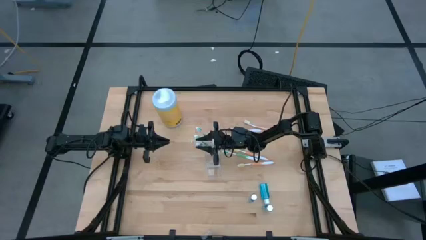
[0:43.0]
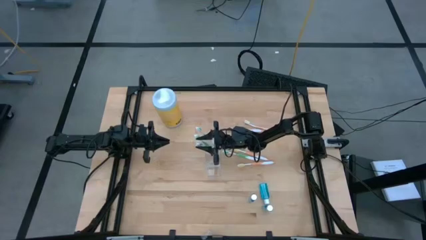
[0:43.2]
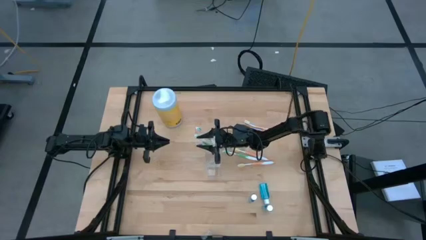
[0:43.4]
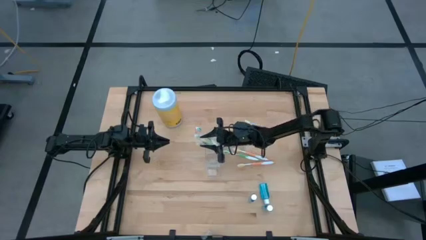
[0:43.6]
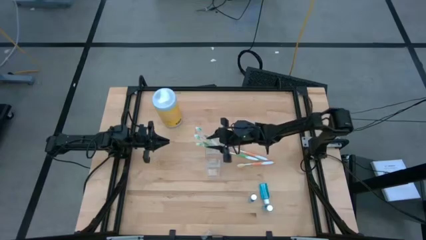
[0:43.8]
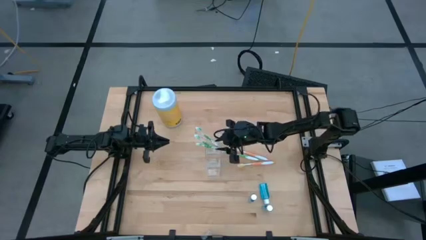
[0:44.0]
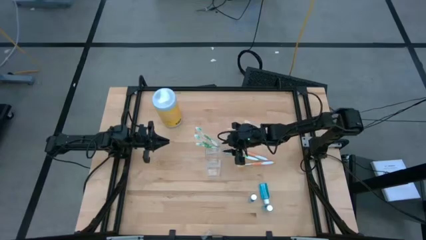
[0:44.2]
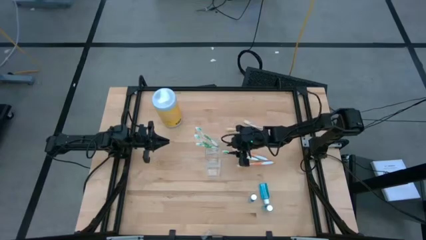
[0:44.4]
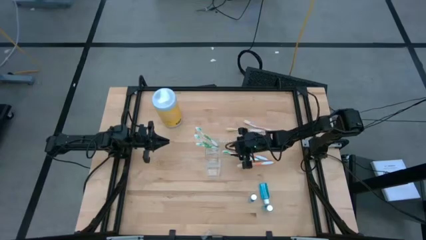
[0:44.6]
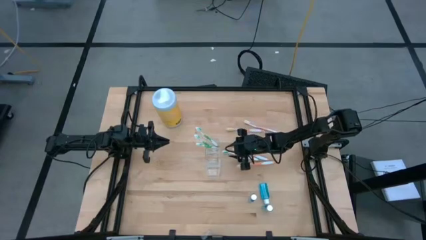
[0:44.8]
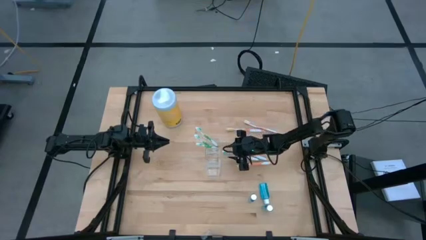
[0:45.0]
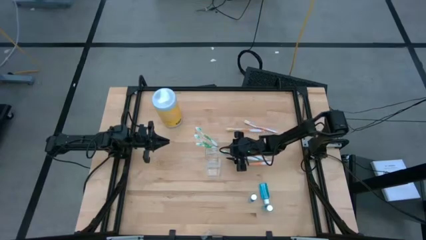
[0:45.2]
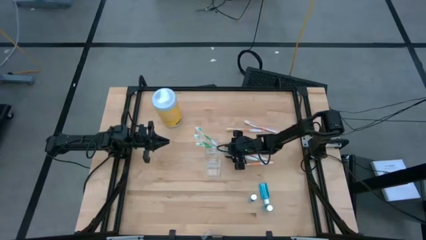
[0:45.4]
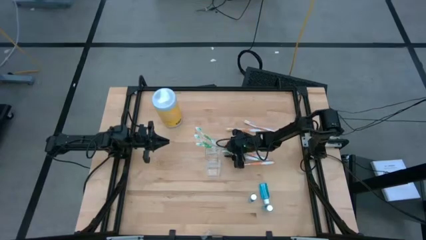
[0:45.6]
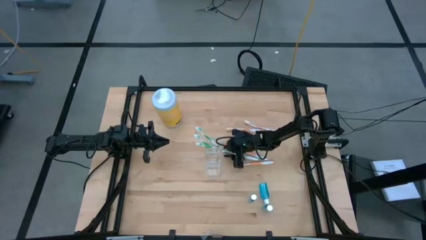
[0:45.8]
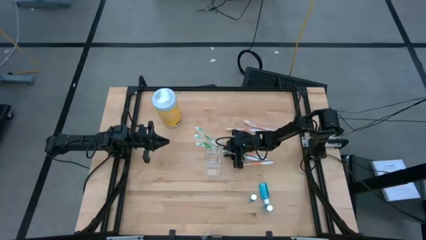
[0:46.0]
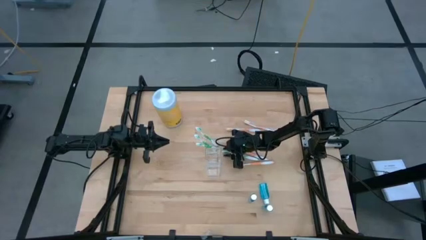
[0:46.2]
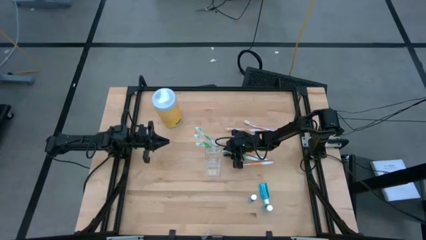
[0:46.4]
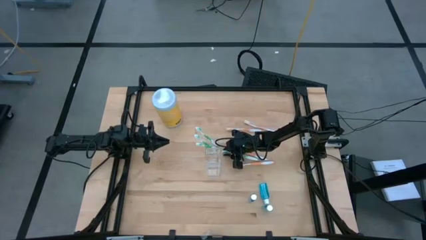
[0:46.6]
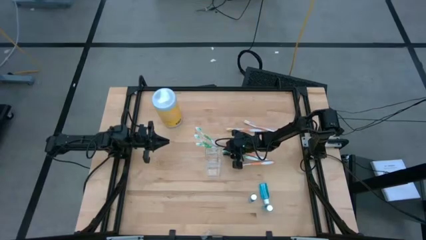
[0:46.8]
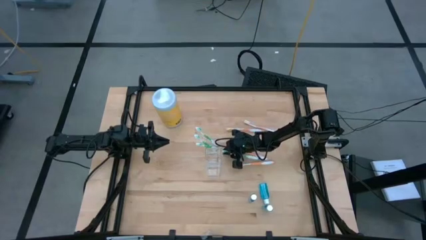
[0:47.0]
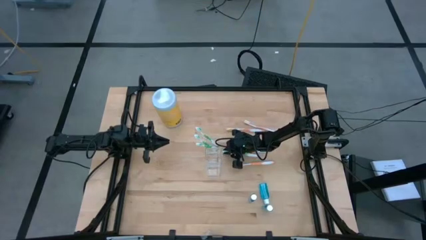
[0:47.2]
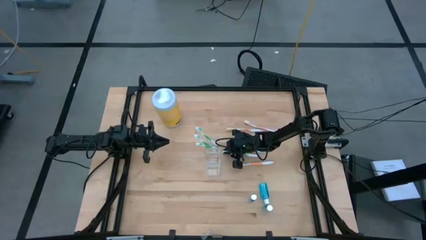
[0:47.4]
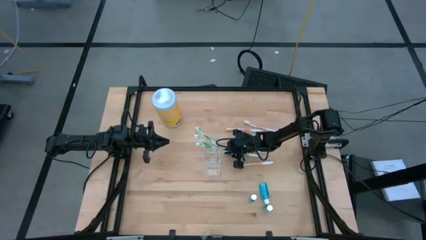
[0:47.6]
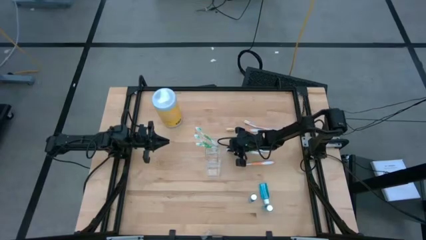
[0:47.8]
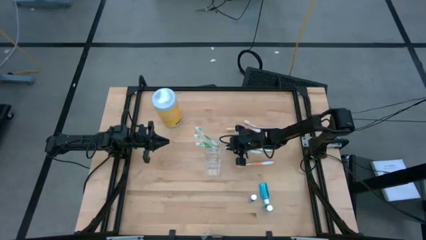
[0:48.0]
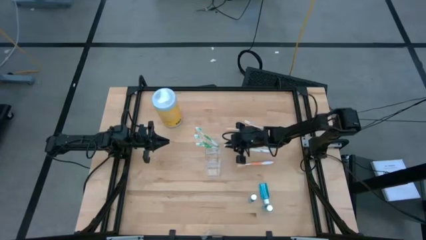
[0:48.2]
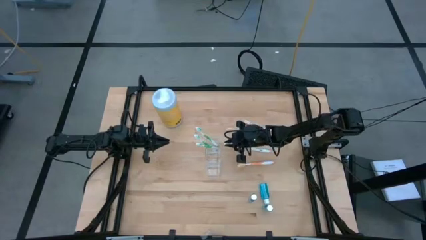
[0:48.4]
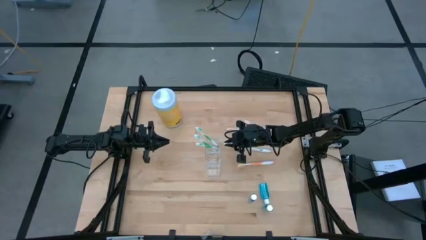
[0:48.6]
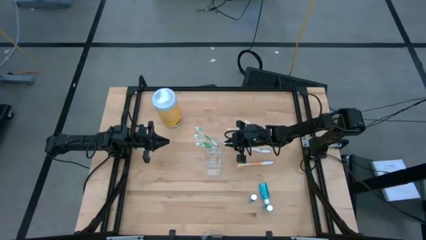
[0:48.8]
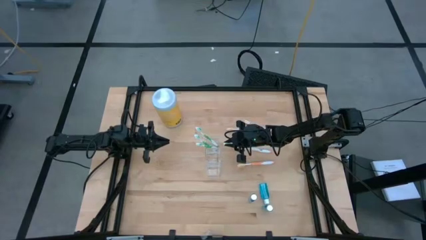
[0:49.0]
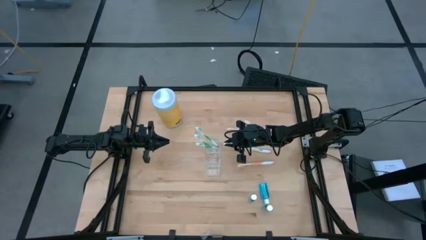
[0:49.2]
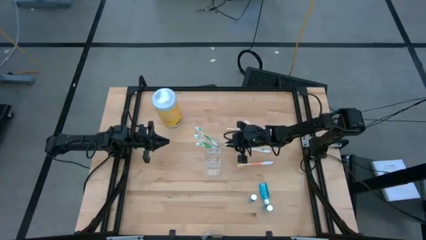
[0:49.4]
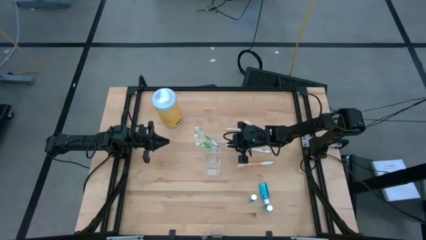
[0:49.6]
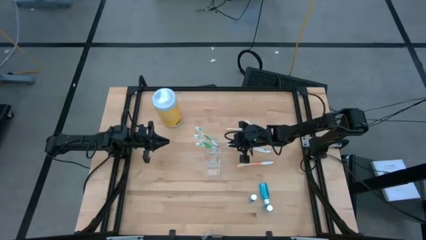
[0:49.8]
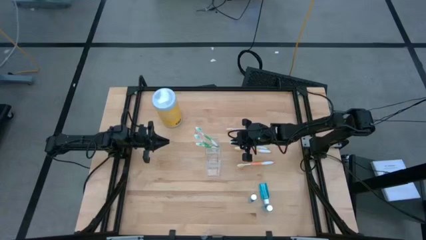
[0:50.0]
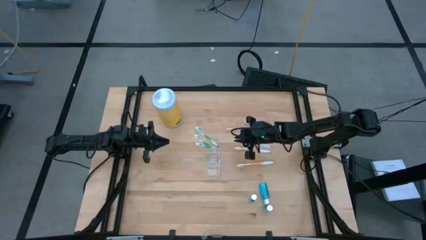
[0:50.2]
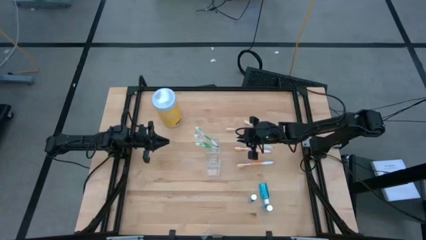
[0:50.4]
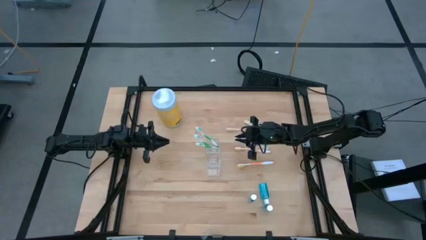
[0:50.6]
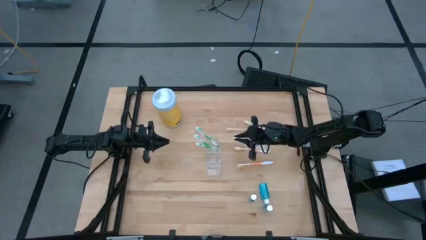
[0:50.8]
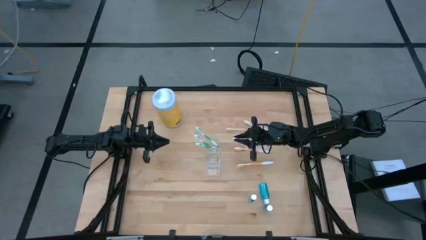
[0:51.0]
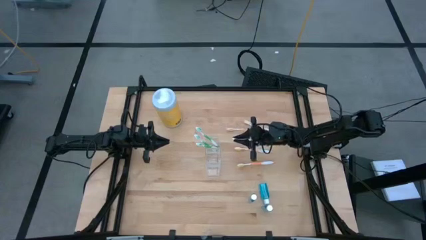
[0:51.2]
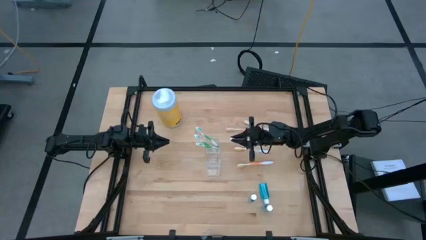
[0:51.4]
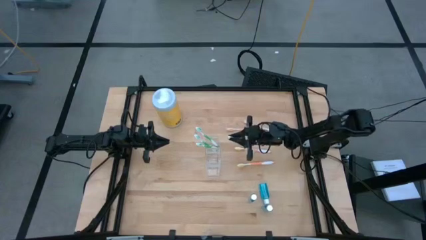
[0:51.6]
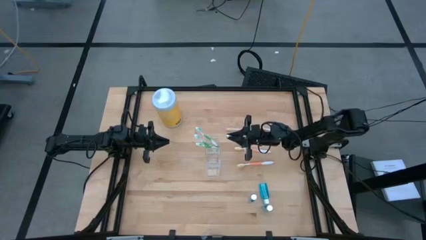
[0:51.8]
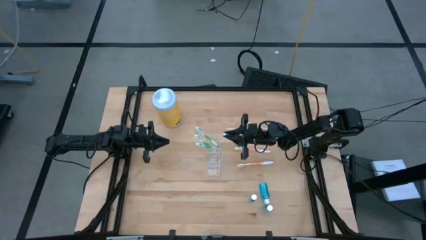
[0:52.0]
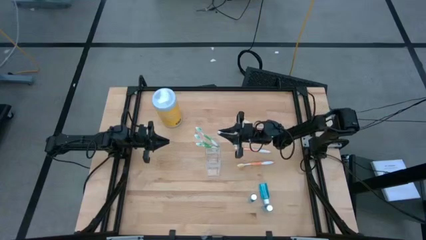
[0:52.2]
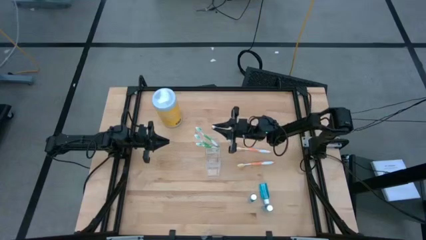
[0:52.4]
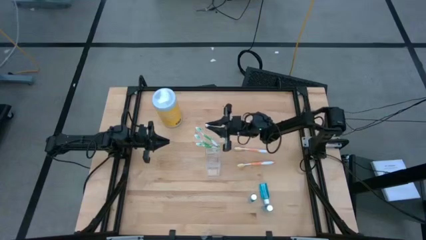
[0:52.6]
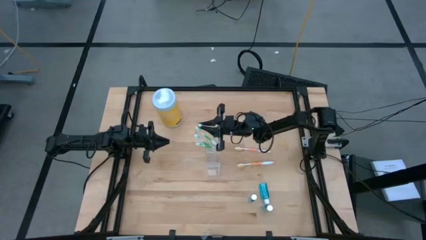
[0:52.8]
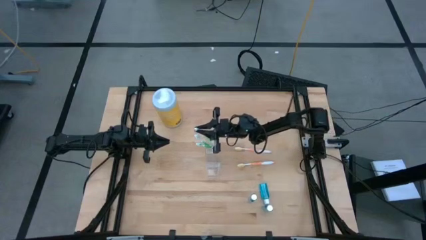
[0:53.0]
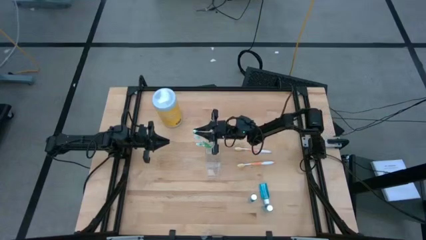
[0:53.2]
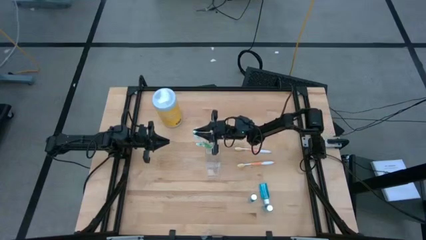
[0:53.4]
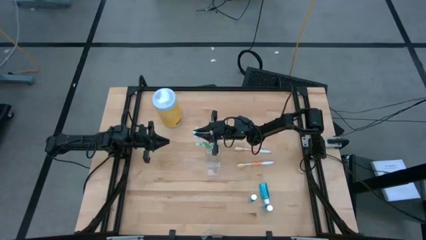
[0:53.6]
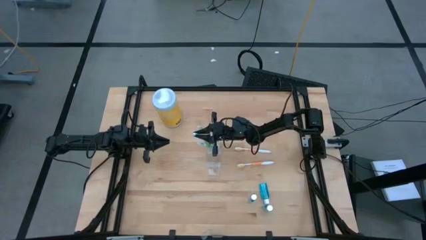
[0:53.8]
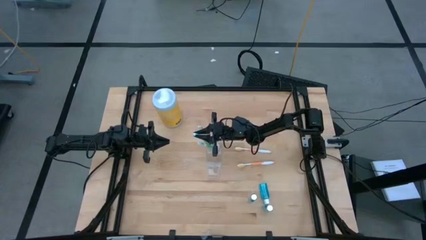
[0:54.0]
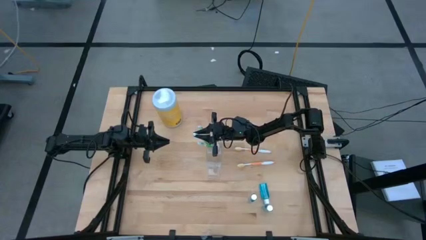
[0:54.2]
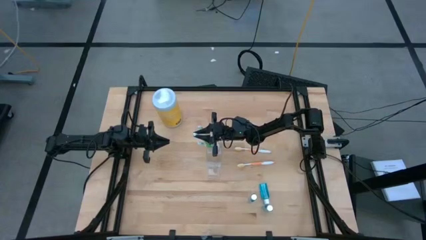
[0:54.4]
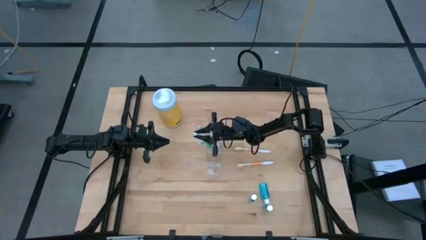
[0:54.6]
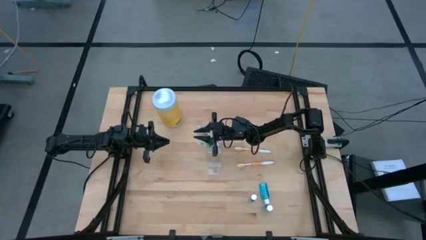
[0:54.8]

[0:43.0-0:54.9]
Task: Pick & Place toothbrushing station
Put the green toothbrush into the transparent organizer
